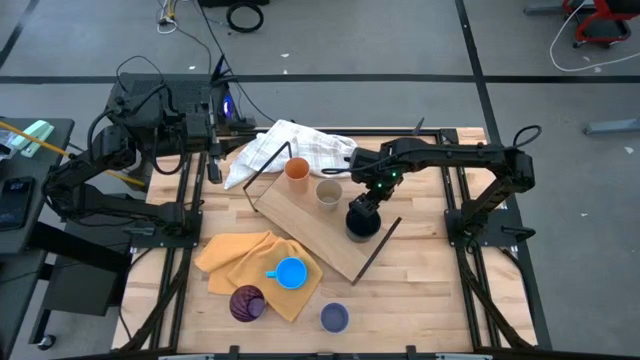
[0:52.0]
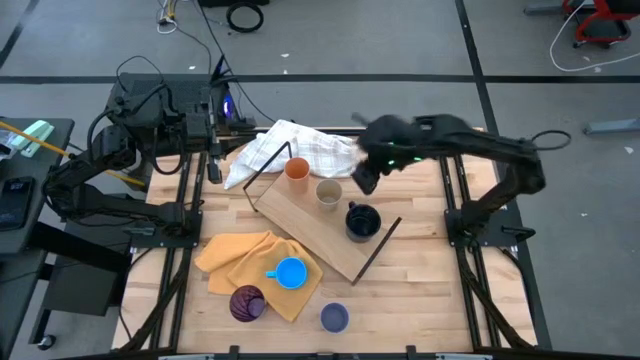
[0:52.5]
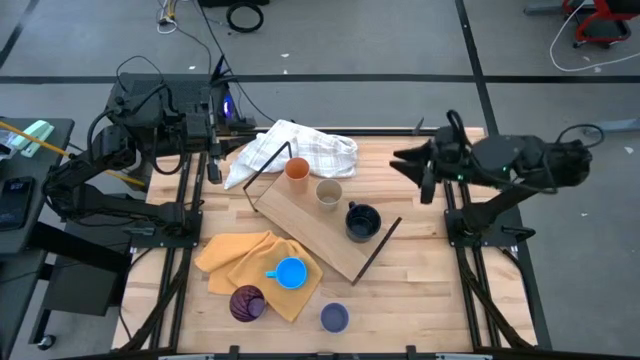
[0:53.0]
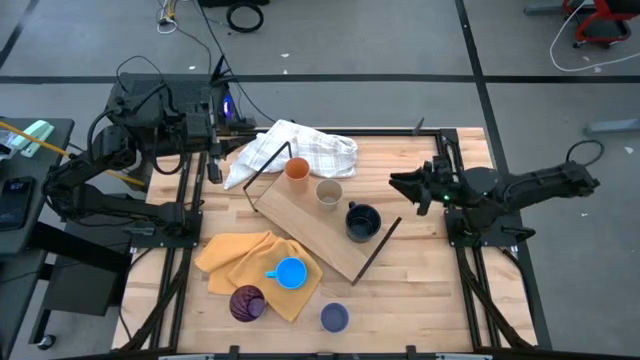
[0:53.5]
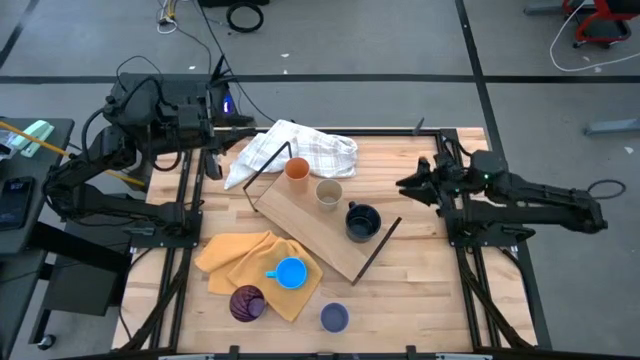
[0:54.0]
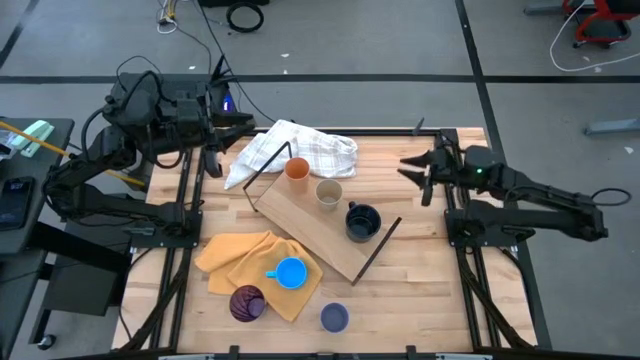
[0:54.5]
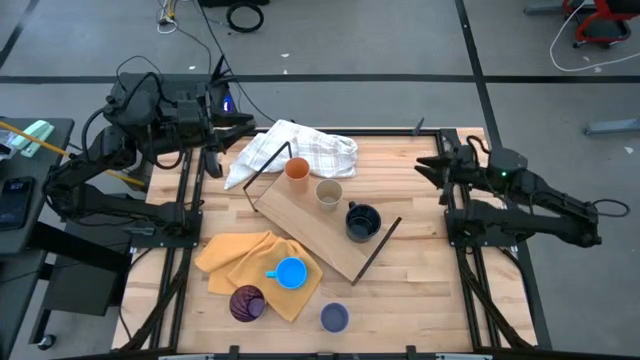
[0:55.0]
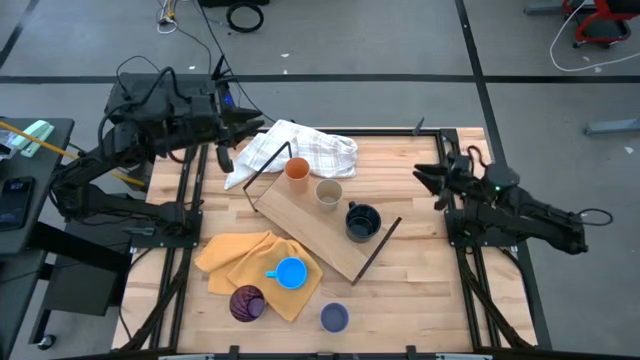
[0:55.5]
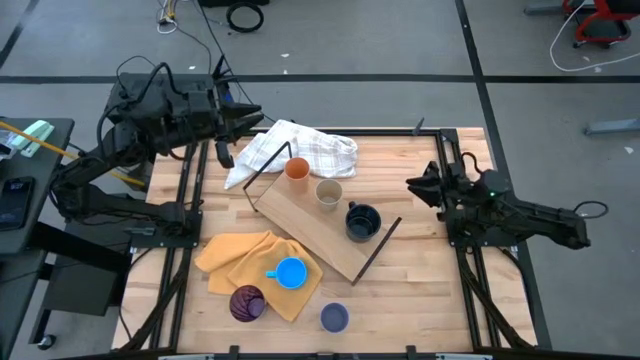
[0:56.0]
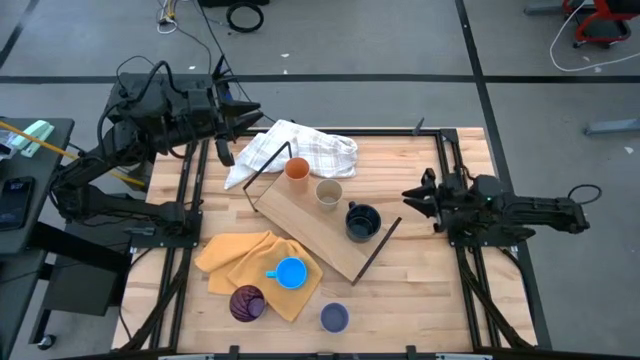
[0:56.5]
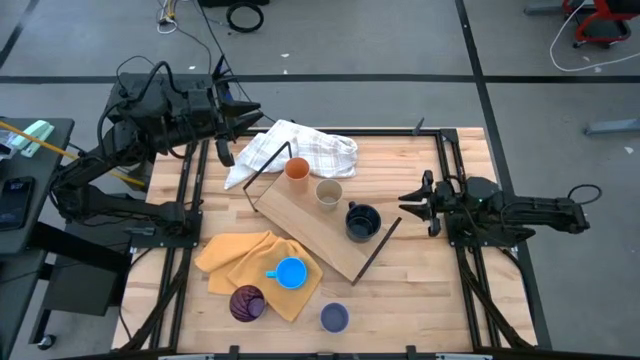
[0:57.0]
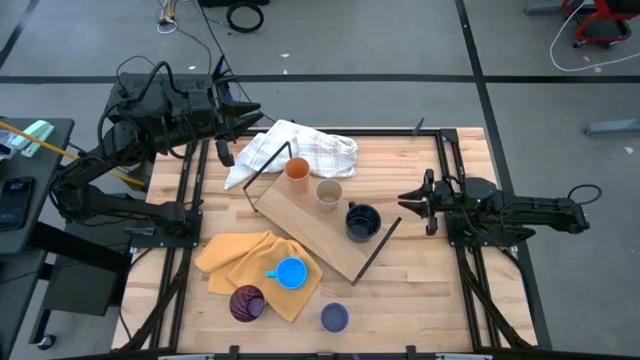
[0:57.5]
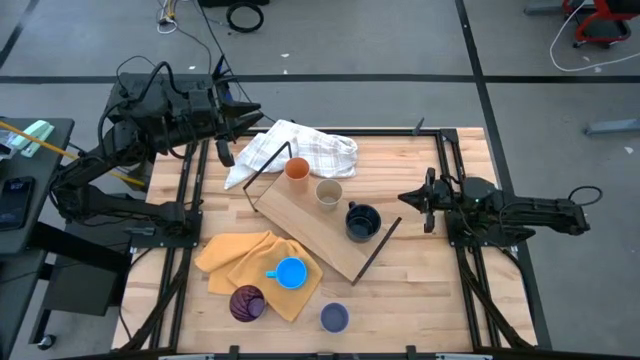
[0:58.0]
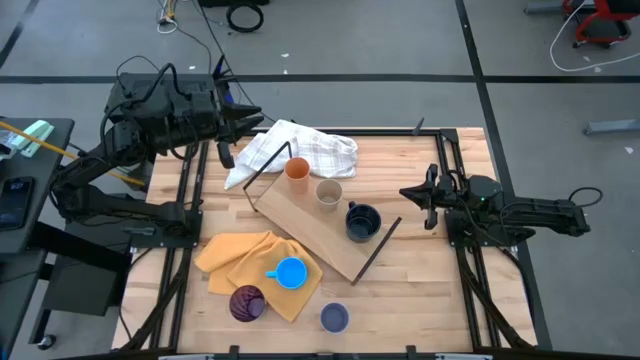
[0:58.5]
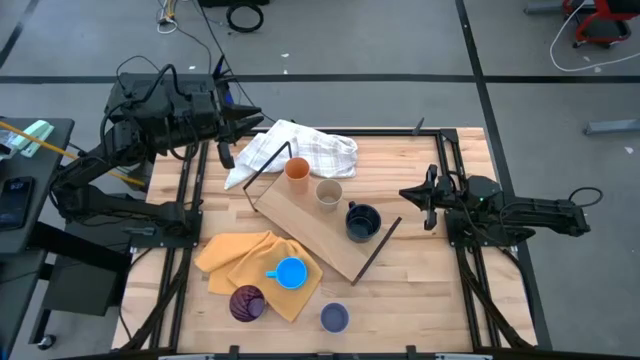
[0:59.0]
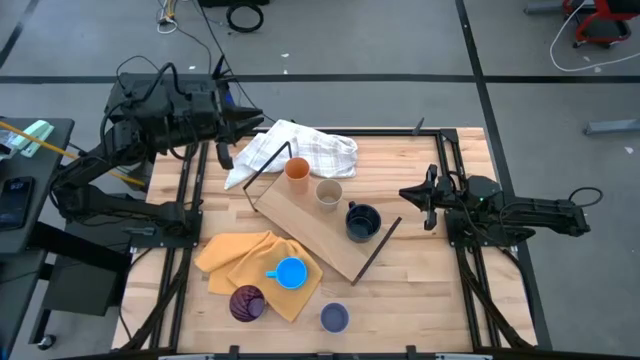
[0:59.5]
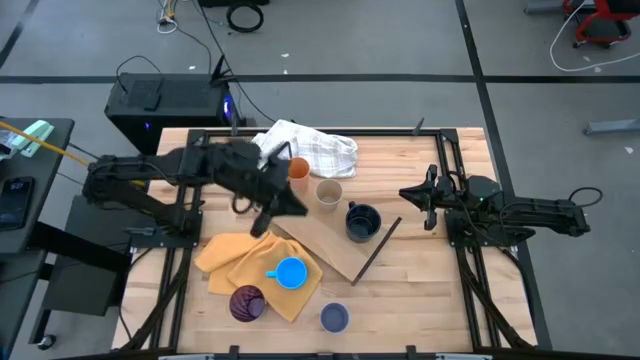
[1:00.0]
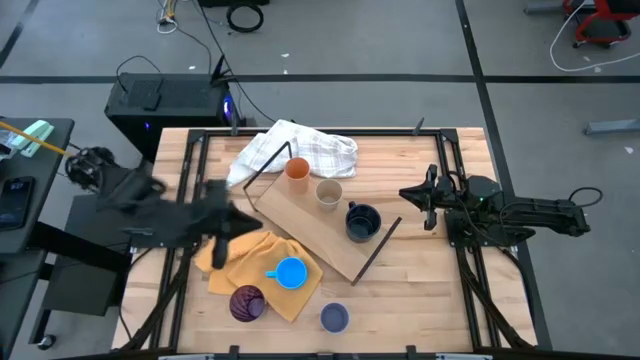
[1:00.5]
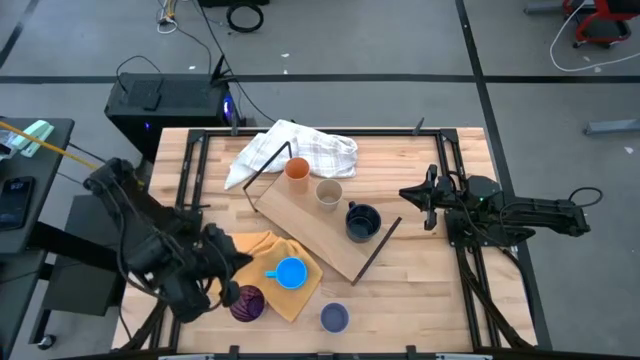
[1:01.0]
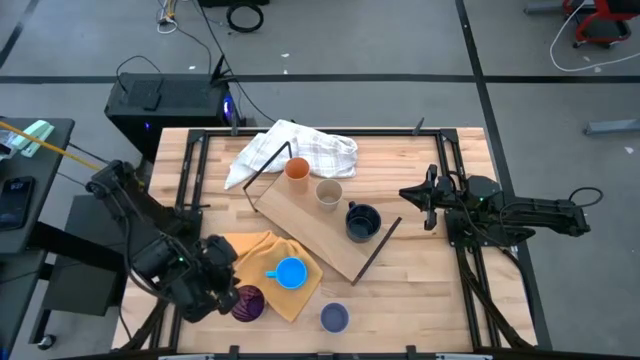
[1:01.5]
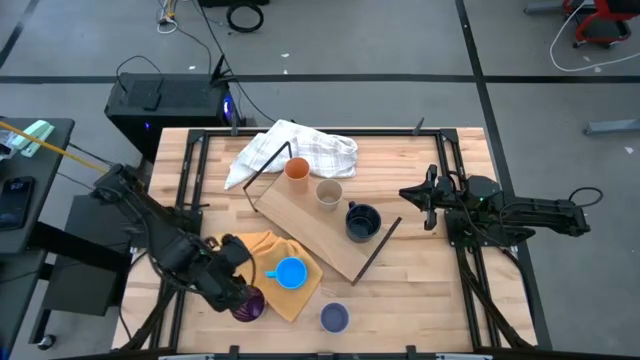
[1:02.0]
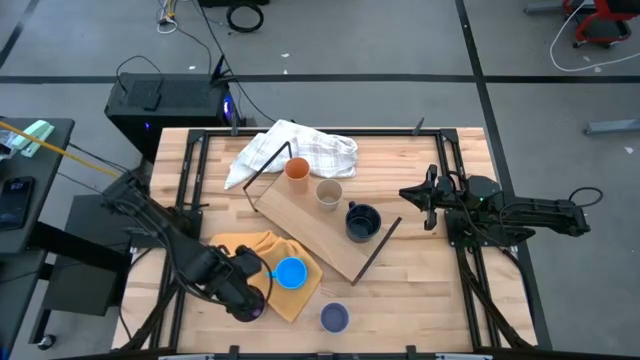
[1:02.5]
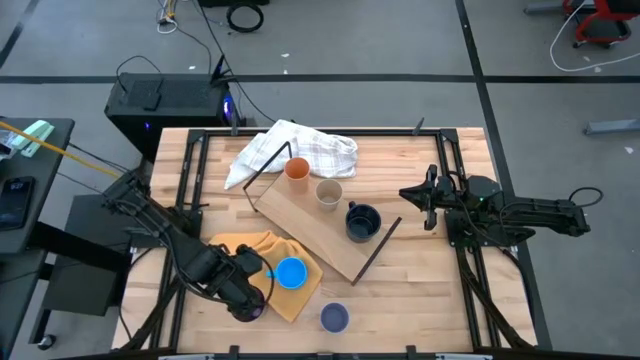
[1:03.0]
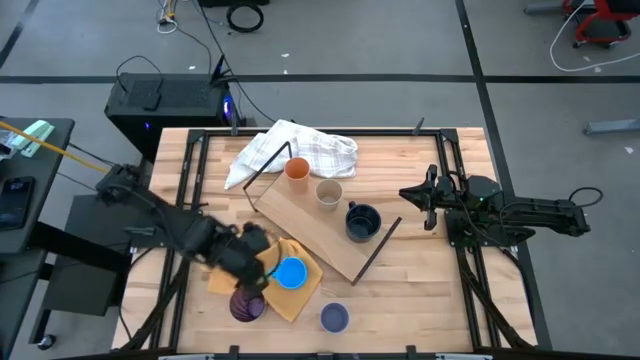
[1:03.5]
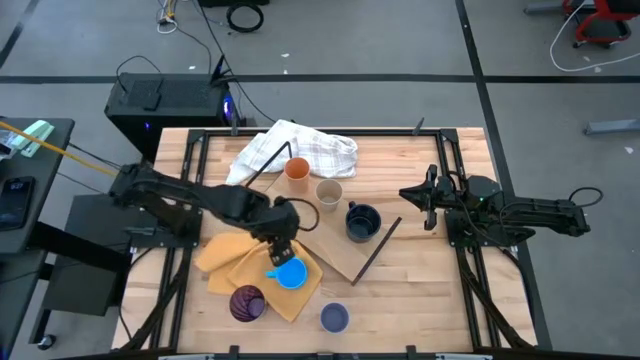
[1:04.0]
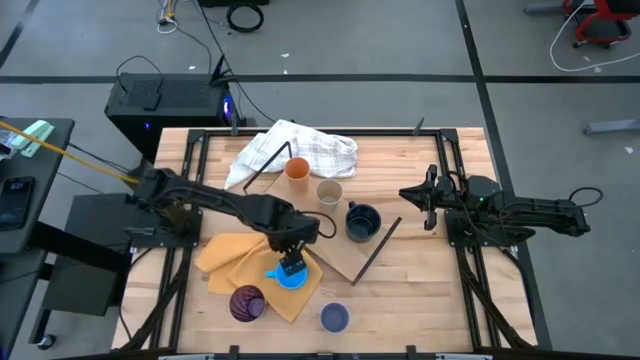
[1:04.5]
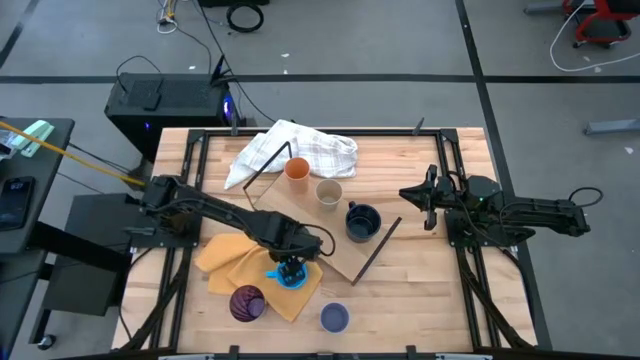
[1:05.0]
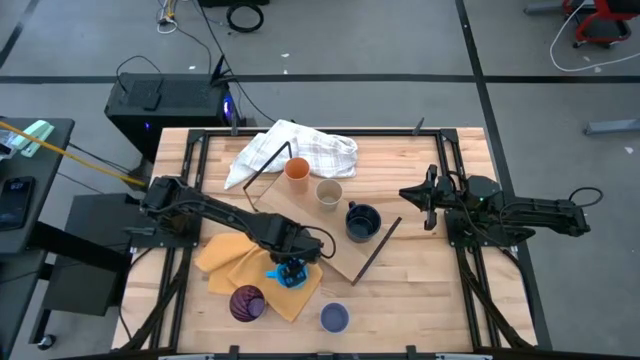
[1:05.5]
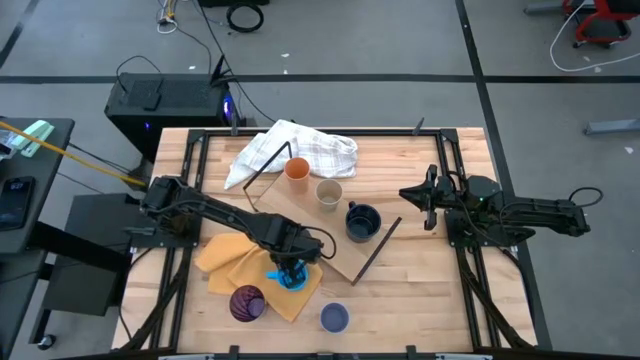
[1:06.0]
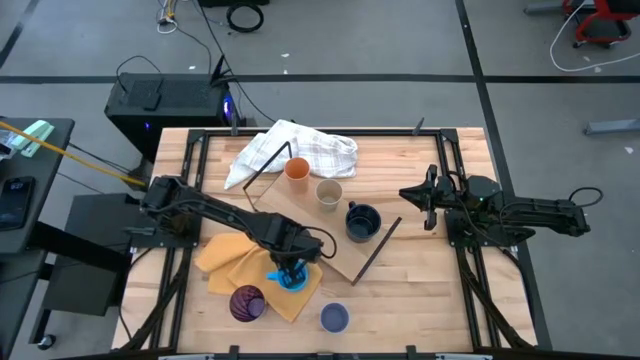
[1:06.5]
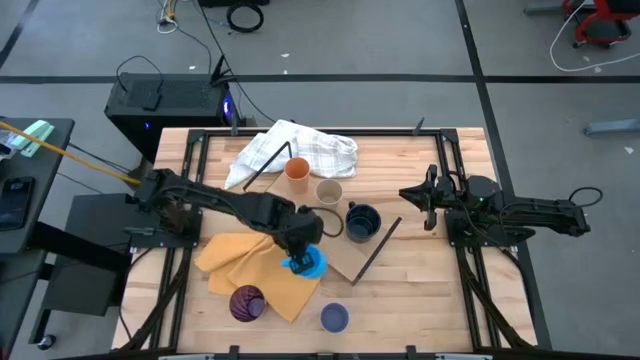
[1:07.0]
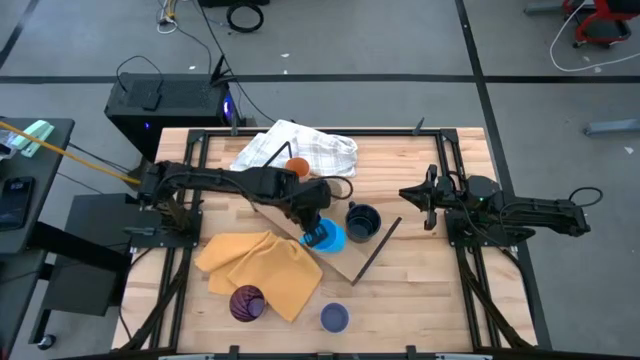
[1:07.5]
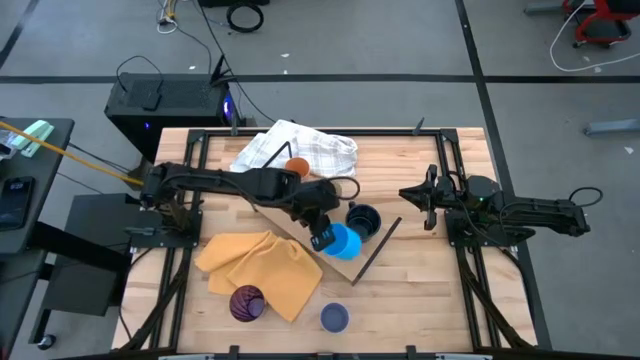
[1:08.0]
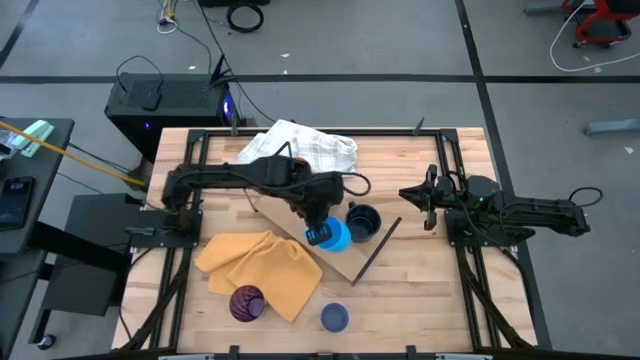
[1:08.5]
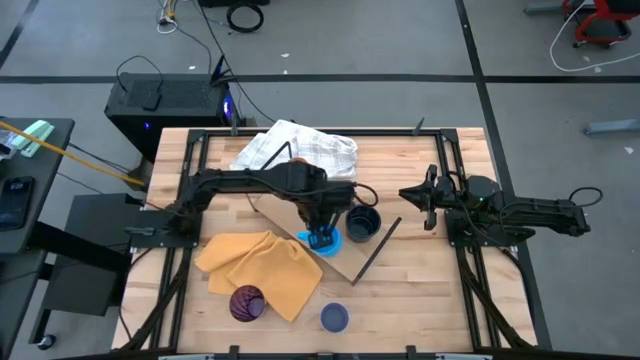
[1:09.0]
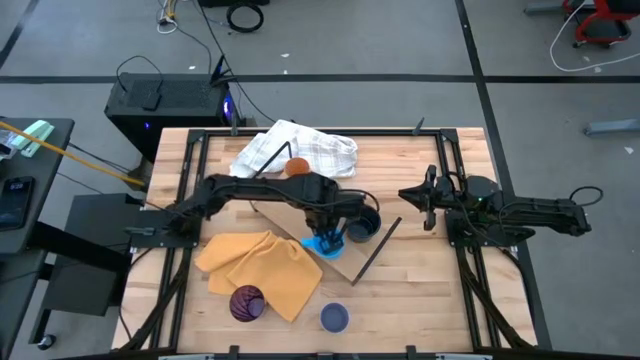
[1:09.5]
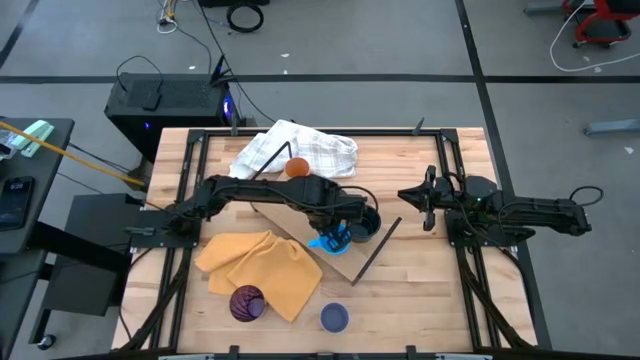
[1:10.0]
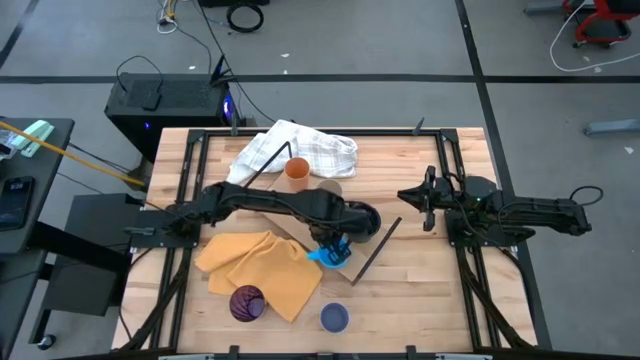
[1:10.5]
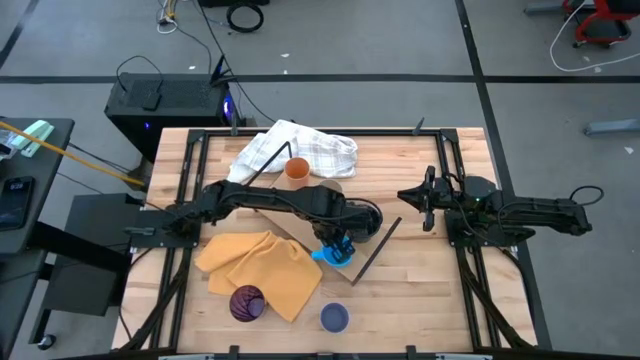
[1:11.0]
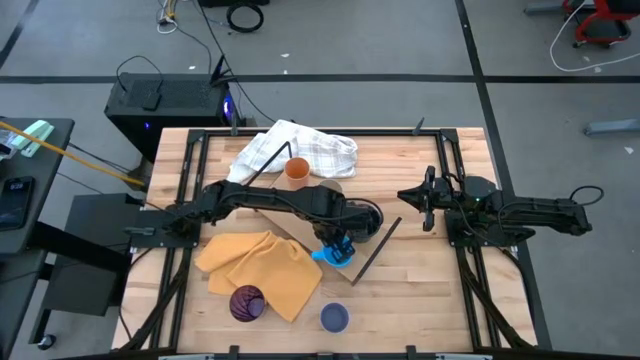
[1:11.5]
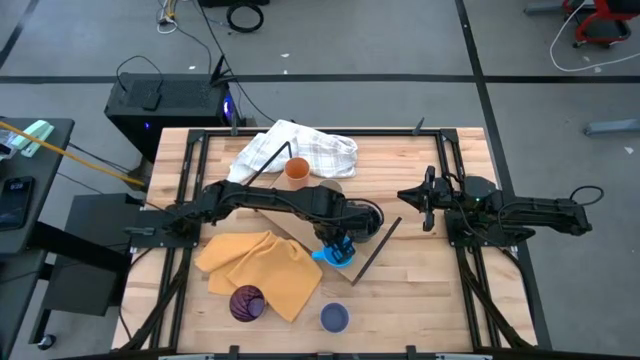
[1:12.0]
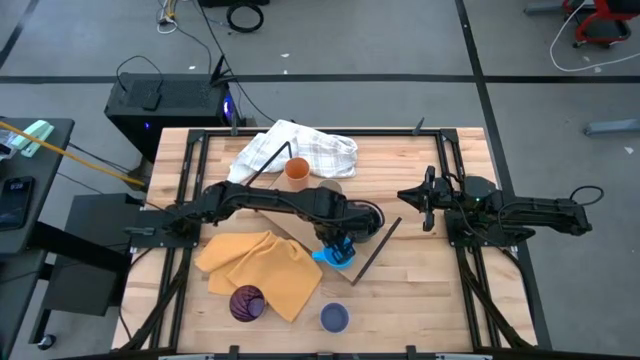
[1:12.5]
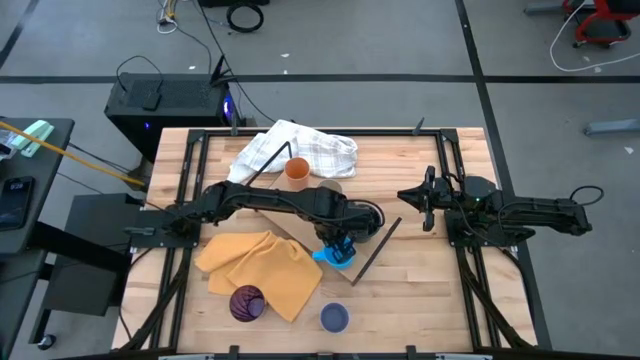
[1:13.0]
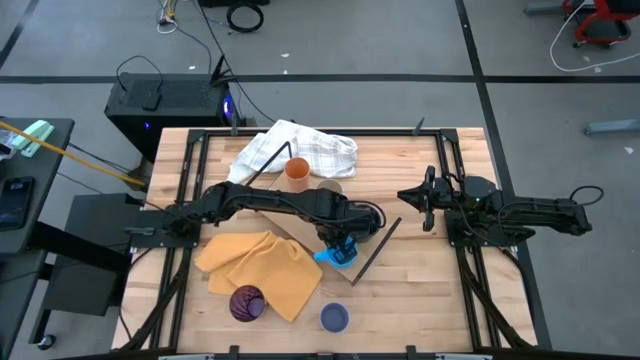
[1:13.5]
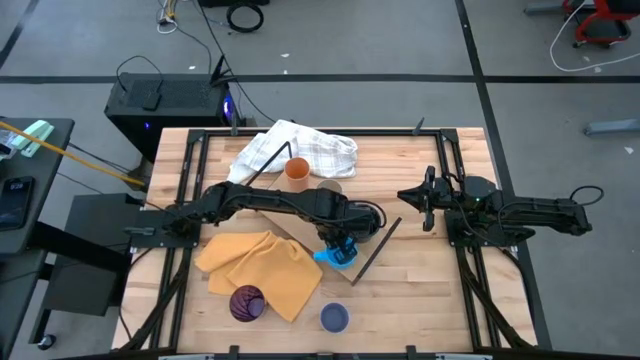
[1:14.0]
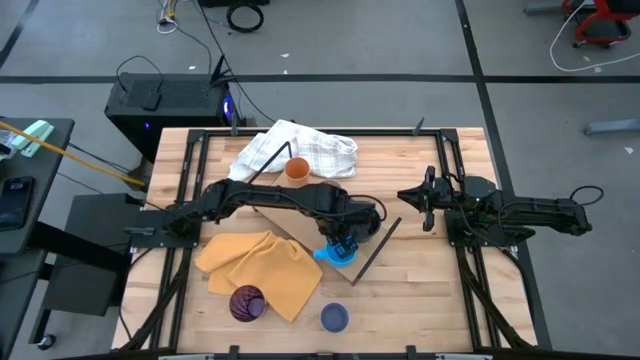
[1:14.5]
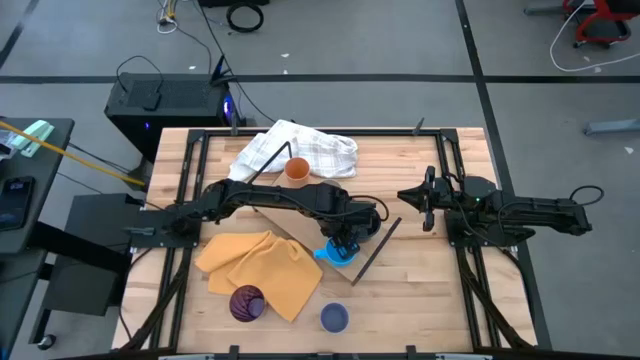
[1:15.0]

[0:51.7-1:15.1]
Task: Stack small to large cups/mugs on shelf
Put the blue mug on the shelf
